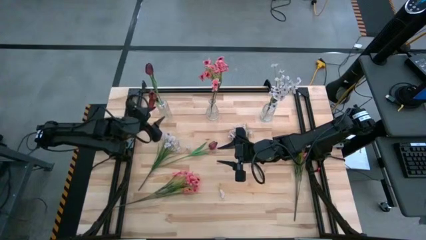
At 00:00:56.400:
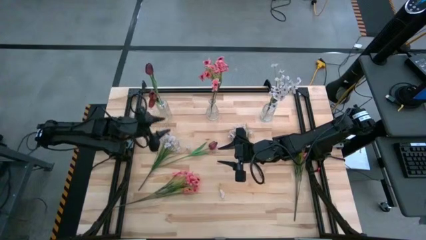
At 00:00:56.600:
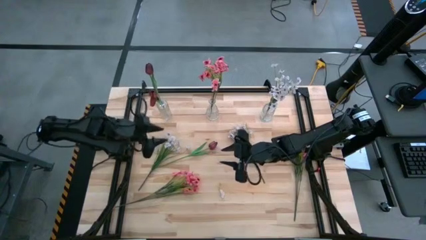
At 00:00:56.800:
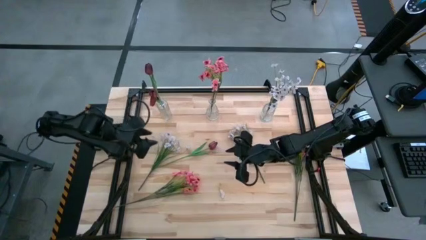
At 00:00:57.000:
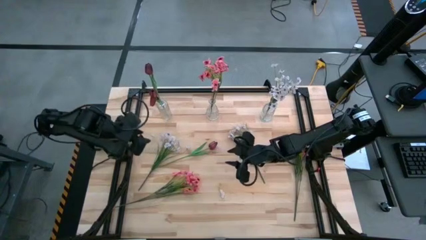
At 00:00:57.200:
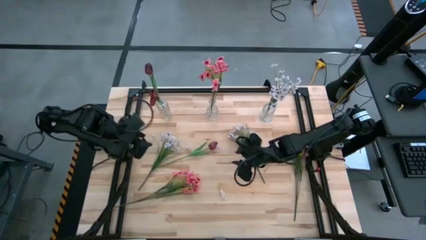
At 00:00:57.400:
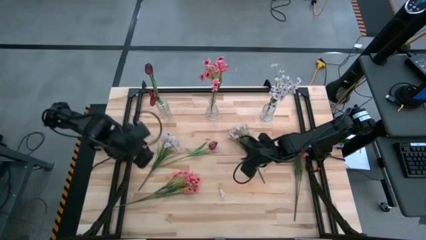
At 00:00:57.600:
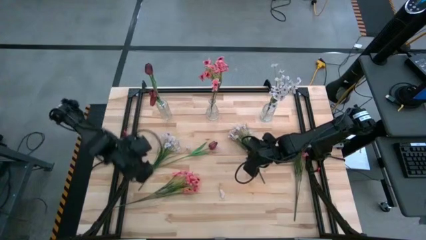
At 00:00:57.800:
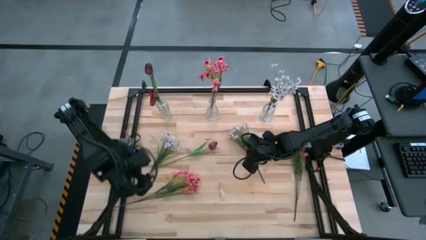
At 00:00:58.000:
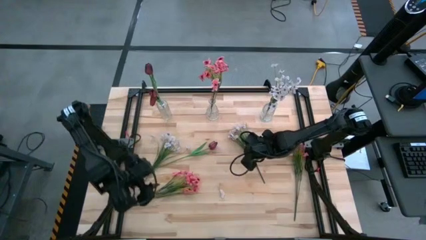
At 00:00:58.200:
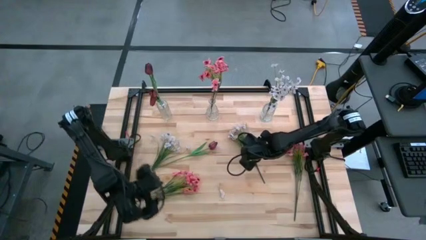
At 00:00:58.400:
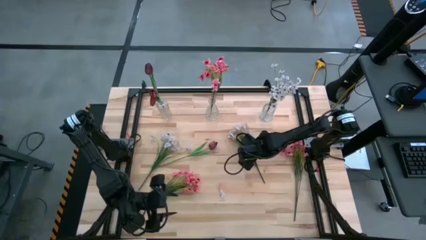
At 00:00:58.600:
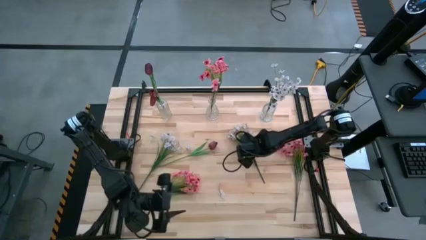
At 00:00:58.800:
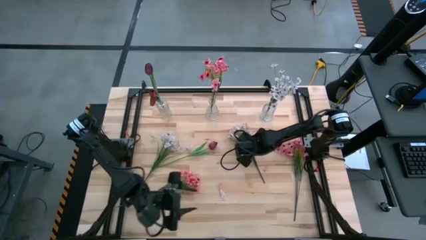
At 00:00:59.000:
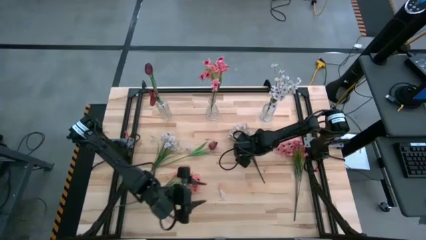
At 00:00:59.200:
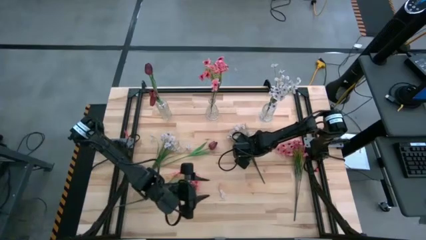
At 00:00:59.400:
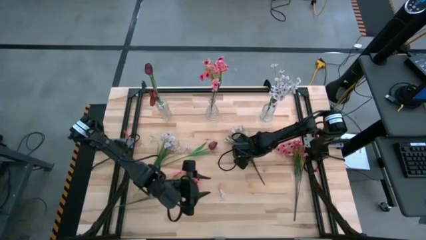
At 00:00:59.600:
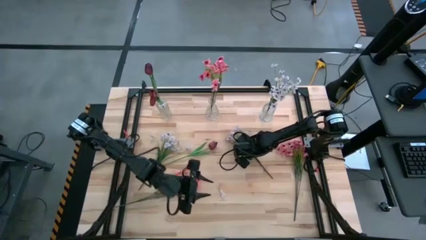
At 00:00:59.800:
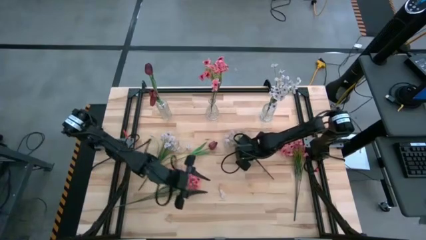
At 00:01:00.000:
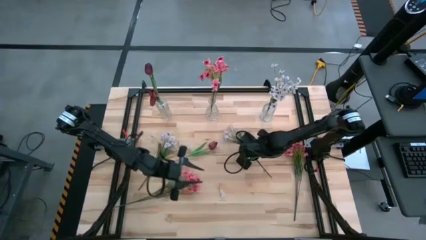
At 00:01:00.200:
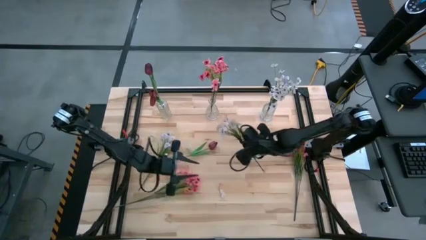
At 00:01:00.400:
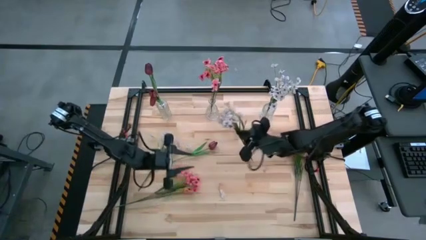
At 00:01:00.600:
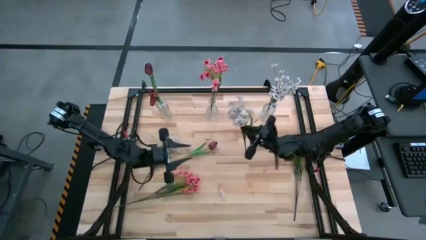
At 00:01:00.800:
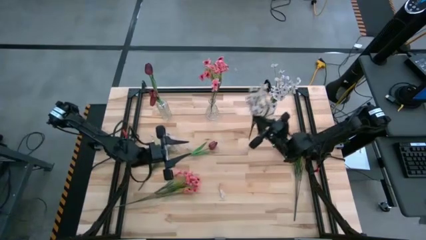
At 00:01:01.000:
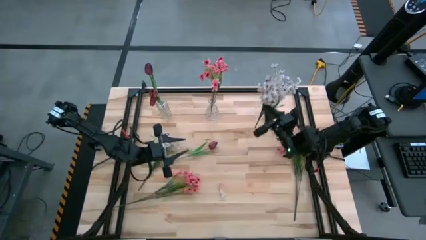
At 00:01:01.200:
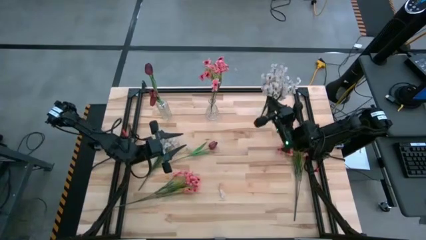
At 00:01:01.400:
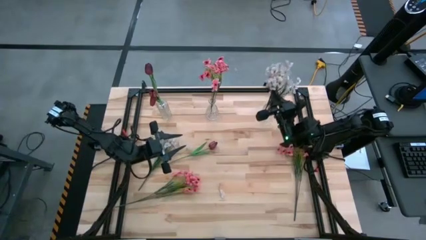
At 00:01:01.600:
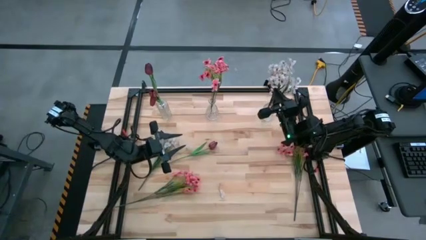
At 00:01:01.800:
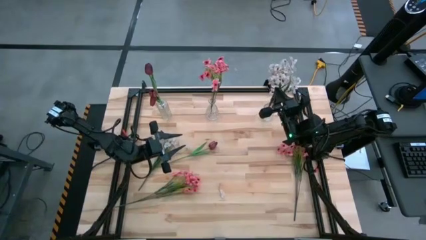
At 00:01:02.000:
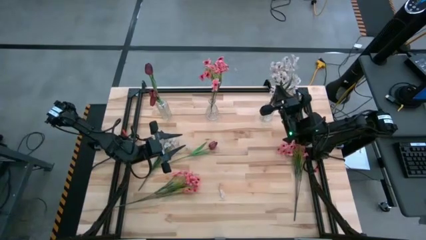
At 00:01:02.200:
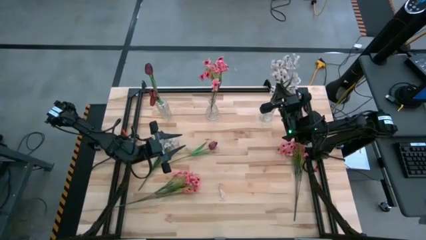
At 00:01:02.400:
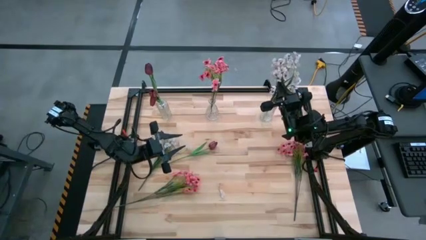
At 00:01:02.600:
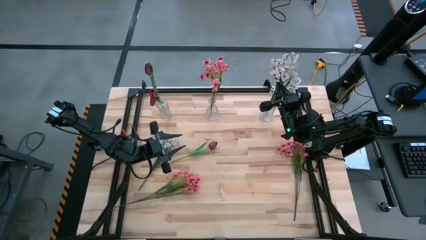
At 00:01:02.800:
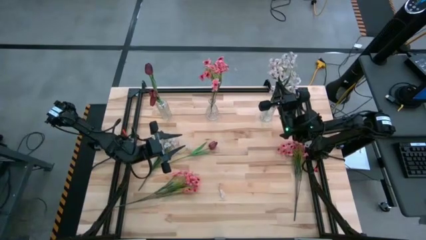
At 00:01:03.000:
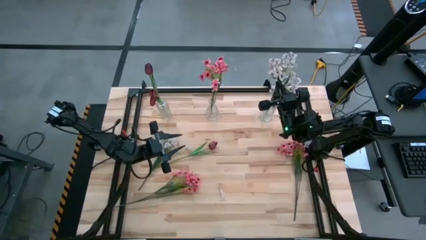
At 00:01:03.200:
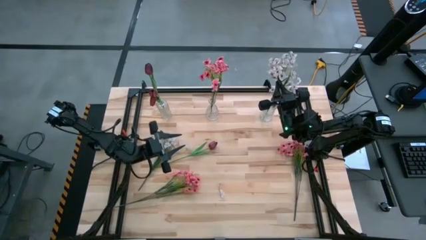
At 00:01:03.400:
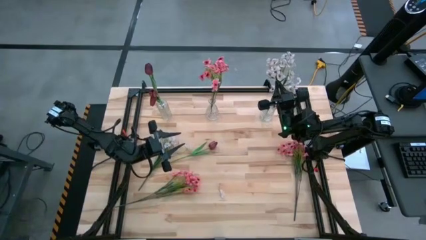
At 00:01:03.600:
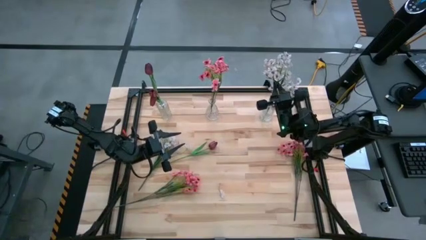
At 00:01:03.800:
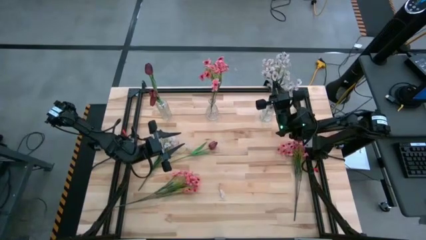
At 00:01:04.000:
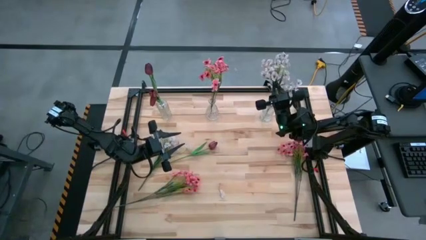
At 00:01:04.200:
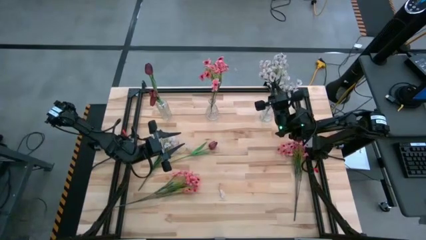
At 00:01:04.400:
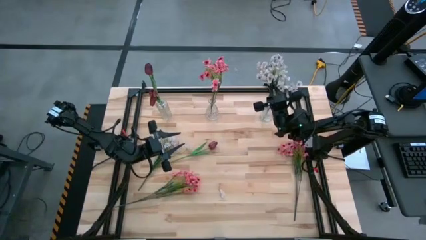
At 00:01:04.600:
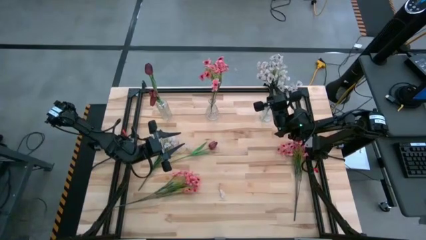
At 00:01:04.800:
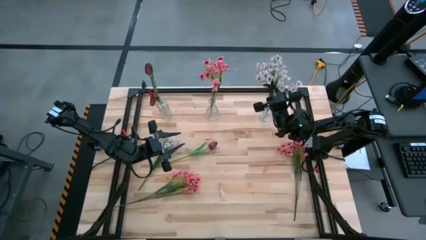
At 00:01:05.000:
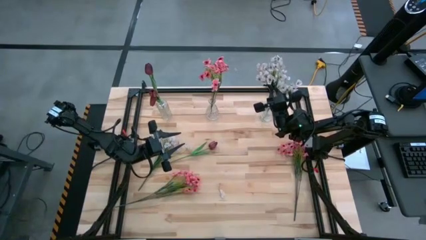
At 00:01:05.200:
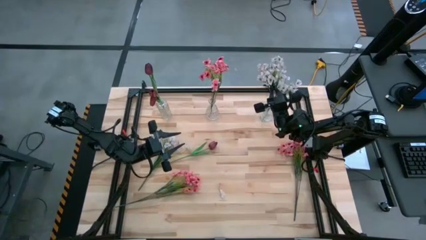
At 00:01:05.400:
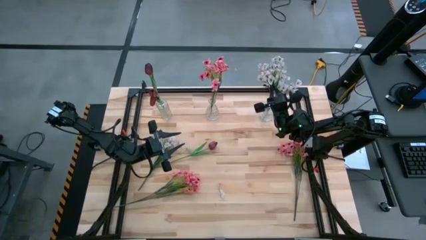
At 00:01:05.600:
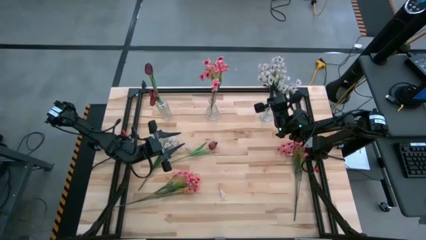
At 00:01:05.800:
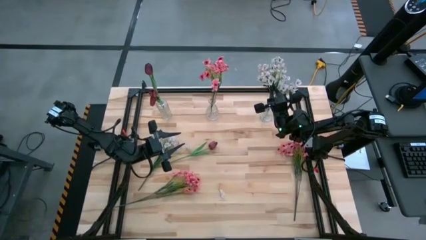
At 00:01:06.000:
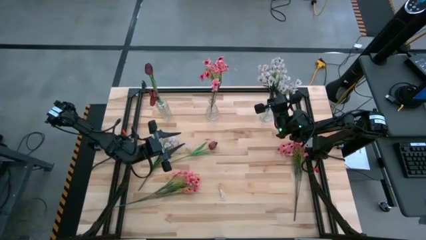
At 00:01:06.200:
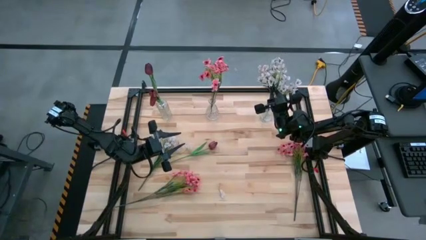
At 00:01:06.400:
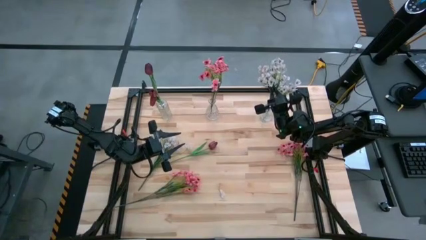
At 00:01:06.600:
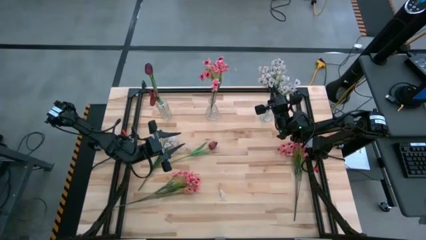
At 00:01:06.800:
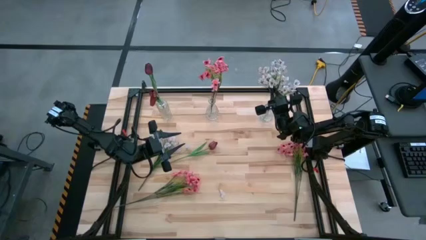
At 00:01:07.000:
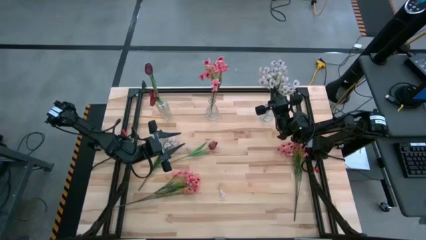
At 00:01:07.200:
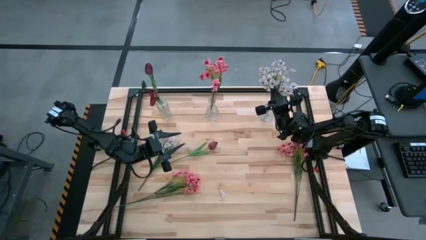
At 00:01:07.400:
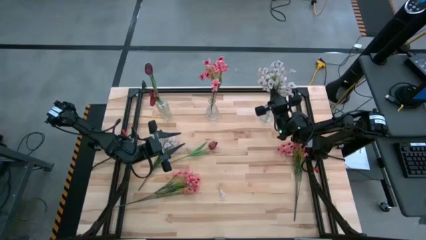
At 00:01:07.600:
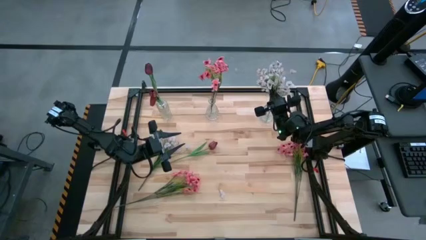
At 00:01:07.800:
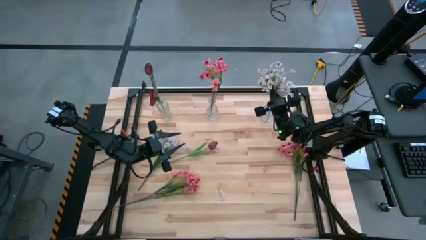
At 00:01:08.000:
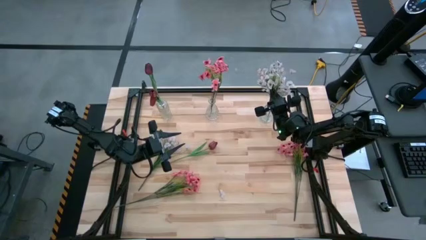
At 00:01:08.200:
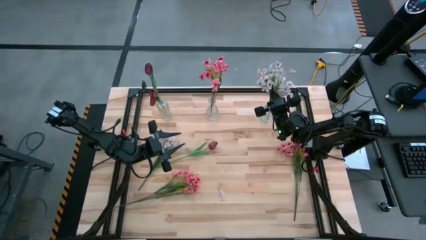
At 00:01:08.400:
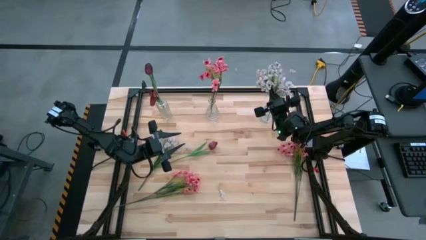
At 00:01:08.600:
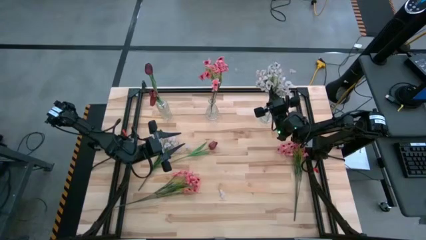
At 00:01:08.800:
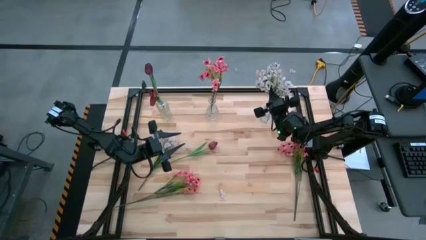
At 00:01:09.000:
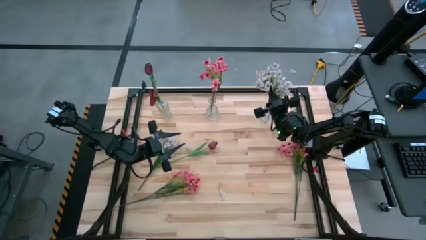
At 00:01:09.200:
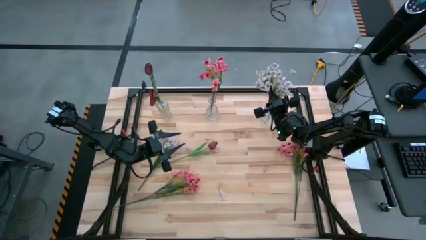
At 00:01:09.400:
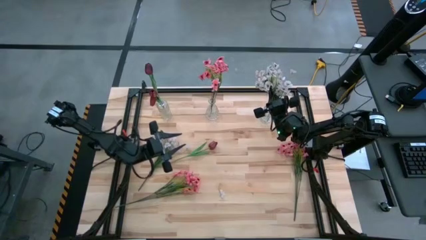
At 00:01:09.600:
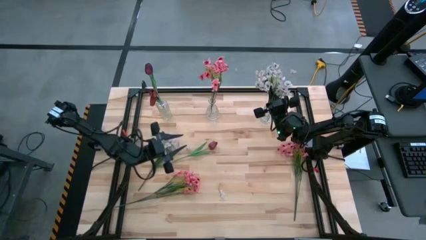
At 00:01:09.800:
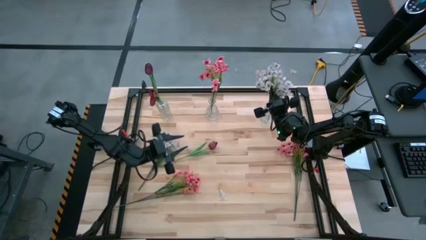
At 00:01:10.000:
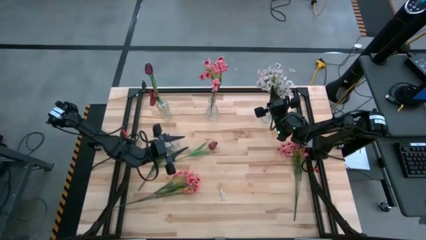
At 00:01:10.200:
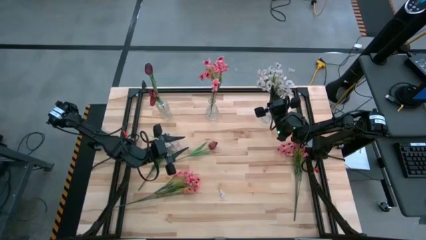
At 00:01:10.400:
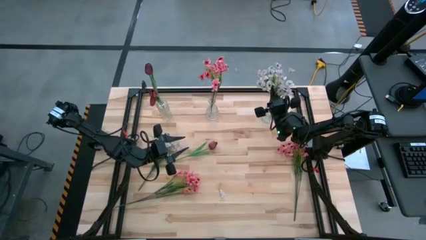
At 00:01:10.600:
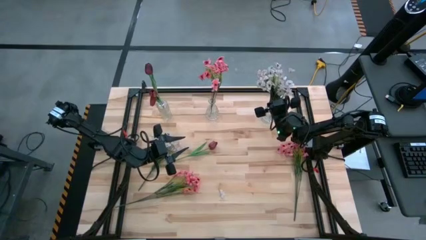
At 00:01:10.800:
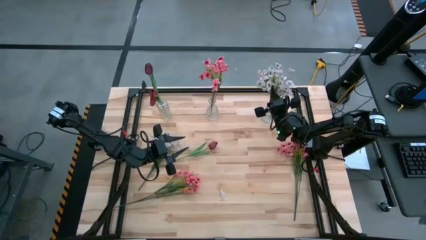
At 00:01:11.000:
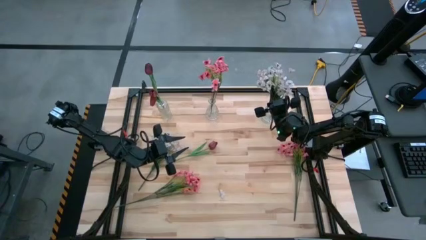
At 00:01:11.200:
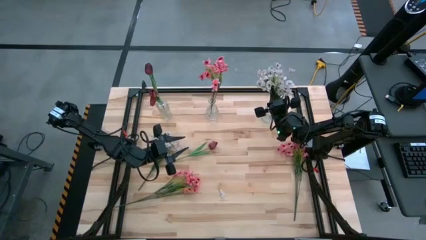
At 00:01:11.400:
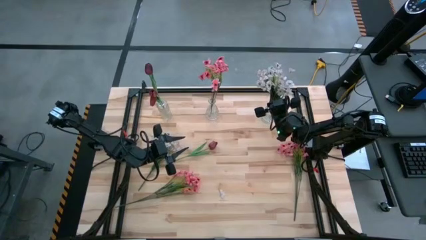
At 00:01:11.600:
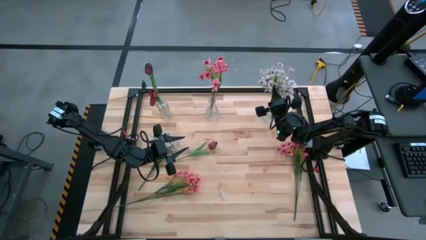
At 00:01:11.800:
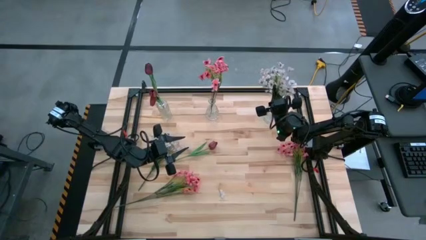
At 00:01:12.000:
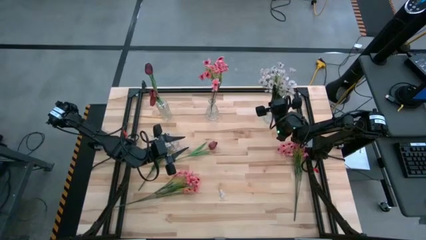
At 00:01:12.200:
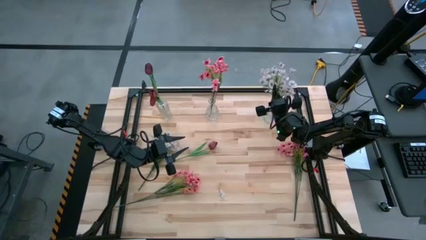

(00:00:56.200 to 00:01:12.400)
Task: Sort flowers into vase by color
Put the right white flowers into the right transparent vase
